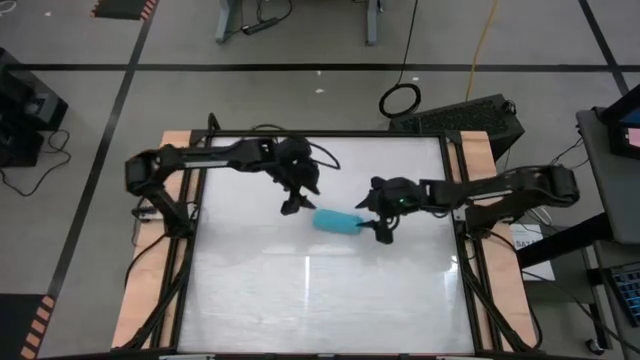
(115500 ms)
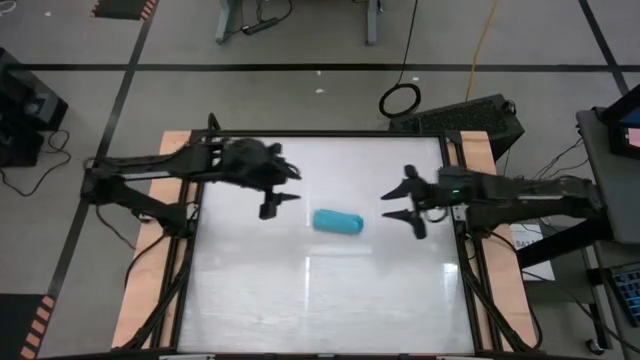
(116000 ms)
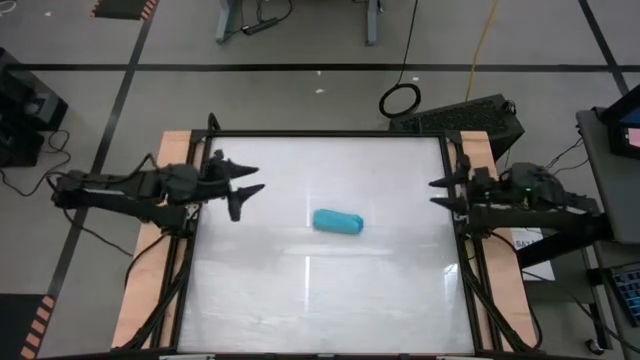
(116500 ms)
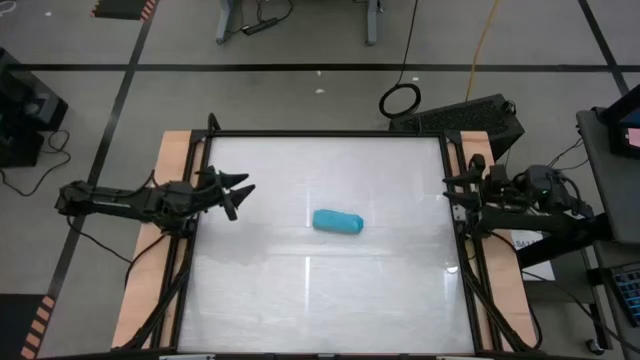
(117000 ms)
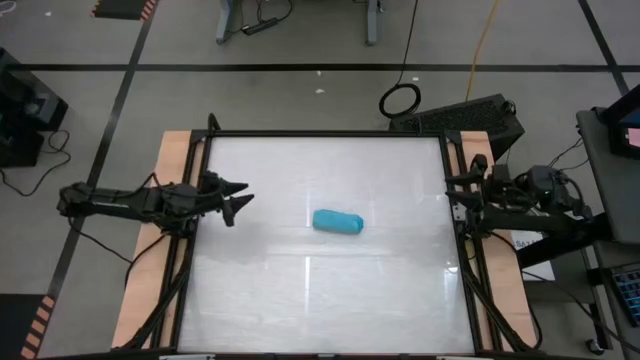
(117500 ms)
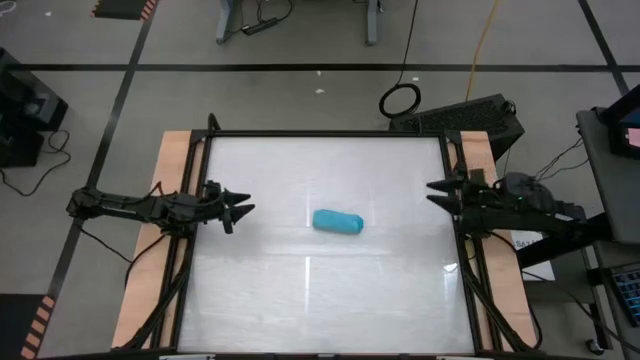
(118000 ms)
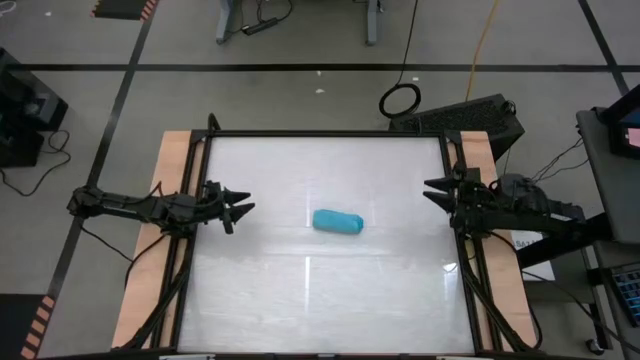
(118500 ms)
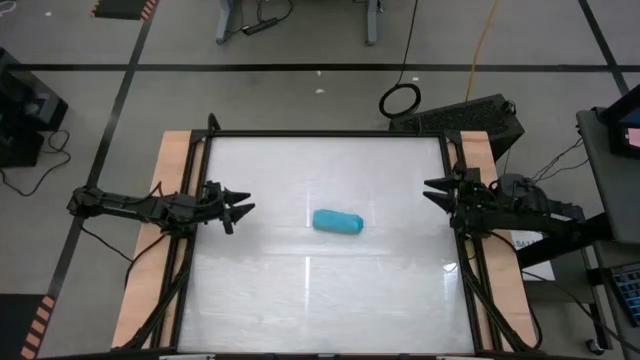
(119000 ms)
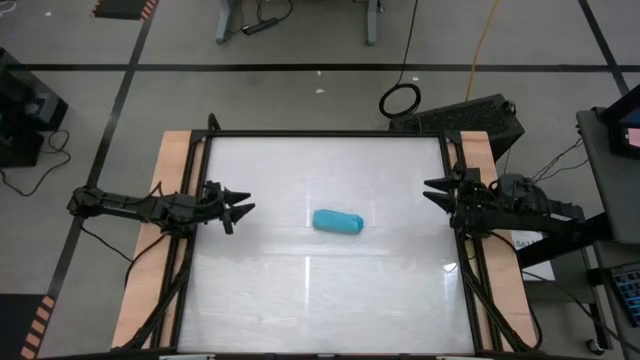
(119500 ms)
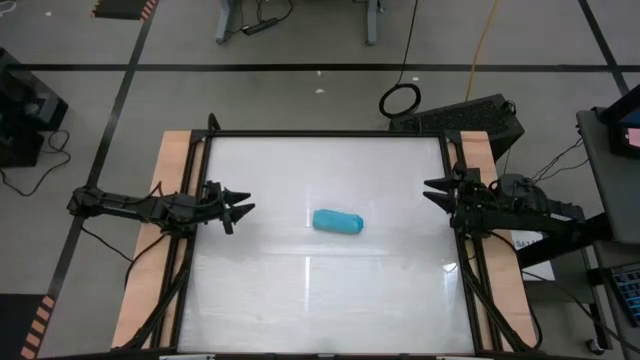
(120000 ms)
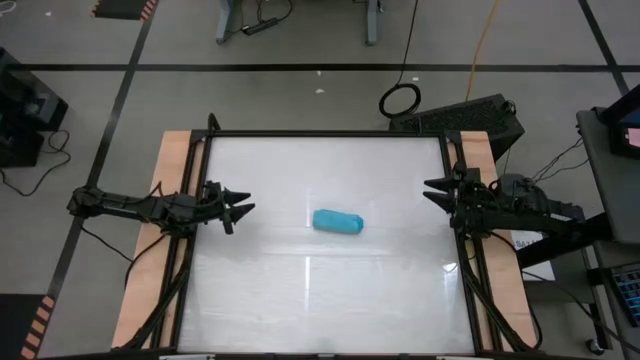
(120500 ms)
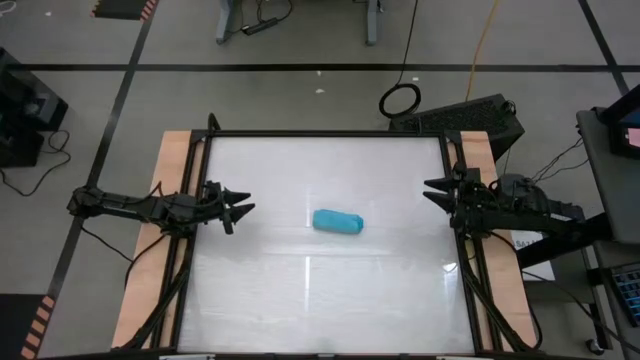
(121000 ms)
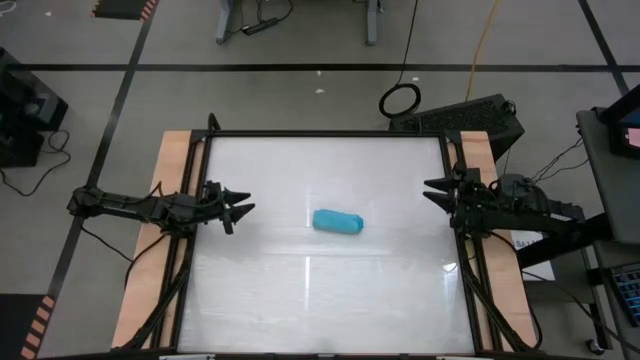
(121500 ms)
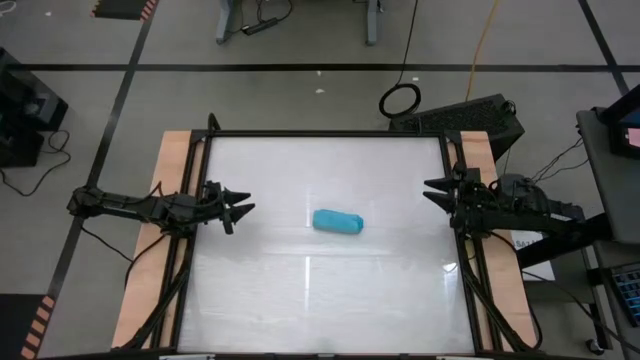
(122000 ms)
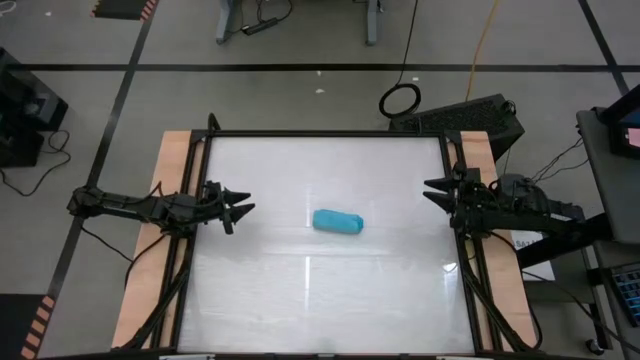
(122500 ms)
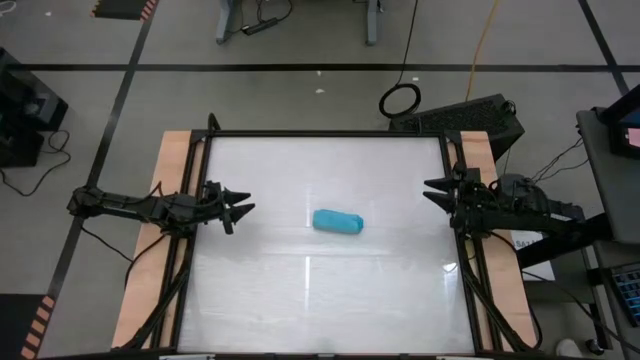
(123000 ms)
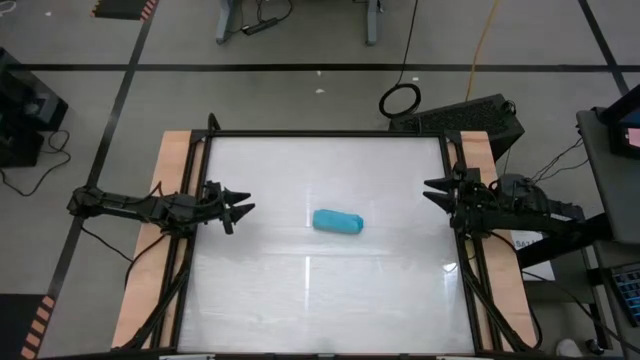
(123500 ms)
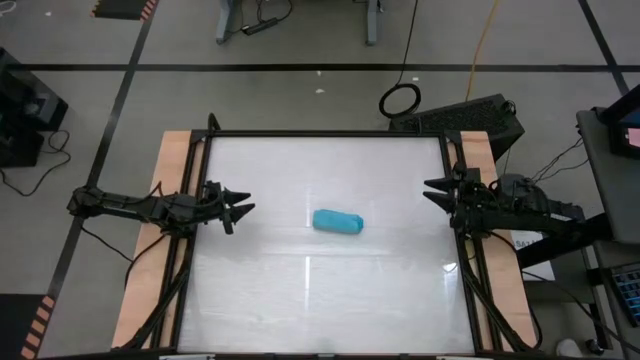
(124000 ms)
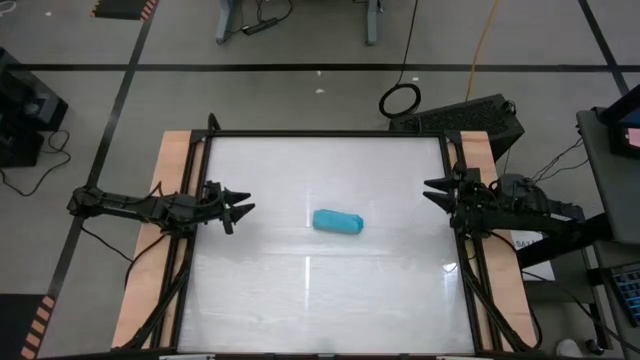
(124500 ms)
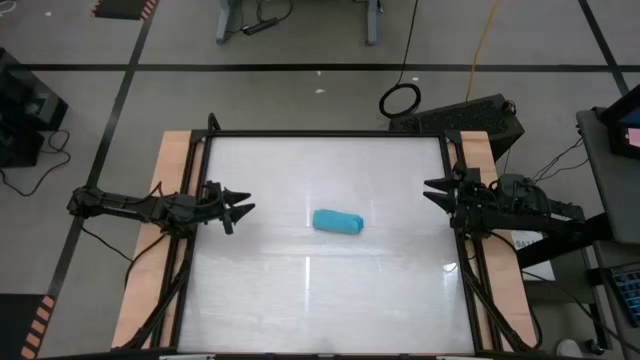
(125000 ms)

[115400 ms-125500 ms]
Task: Roll towel
Return to Home Position

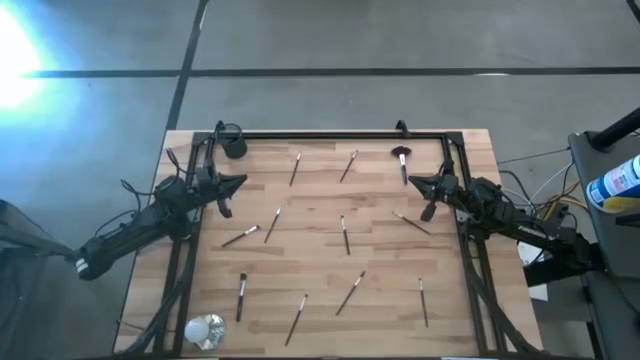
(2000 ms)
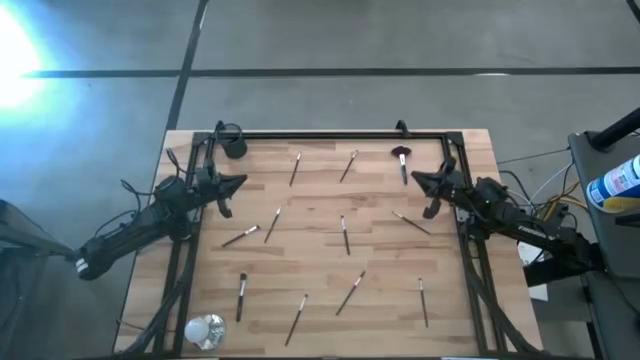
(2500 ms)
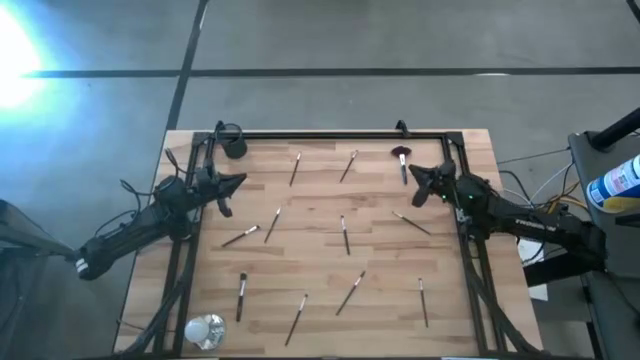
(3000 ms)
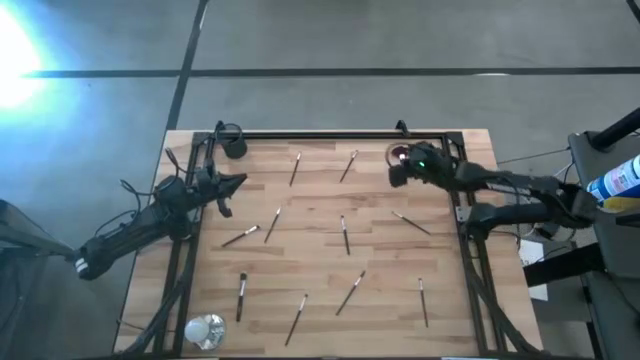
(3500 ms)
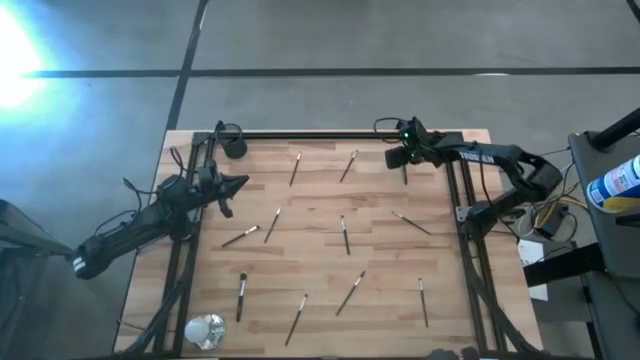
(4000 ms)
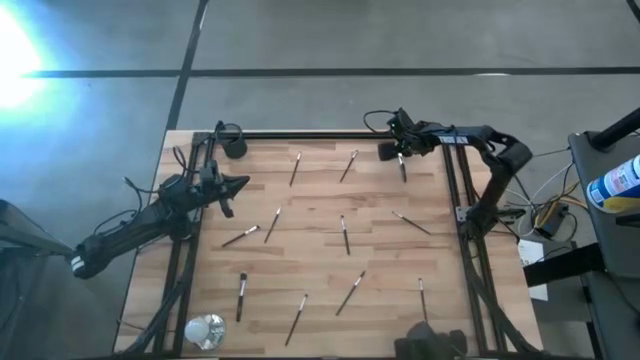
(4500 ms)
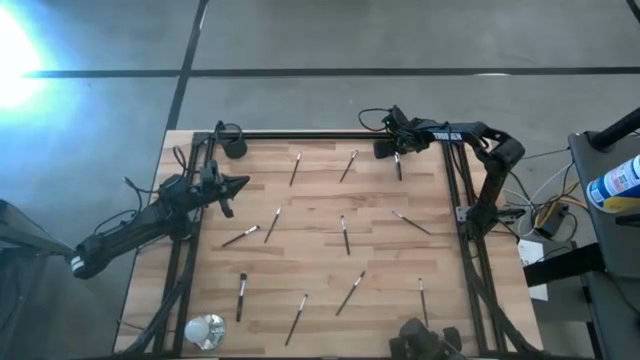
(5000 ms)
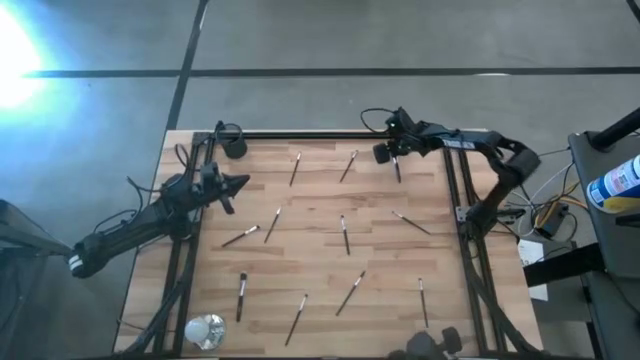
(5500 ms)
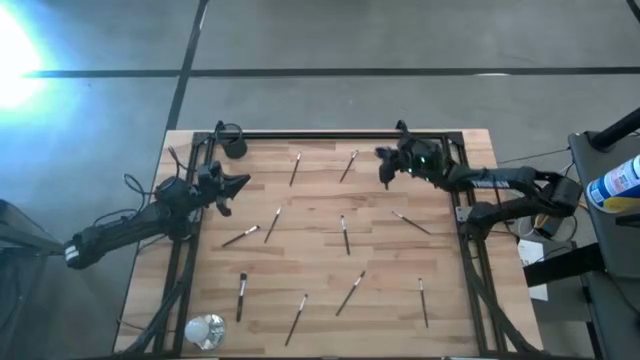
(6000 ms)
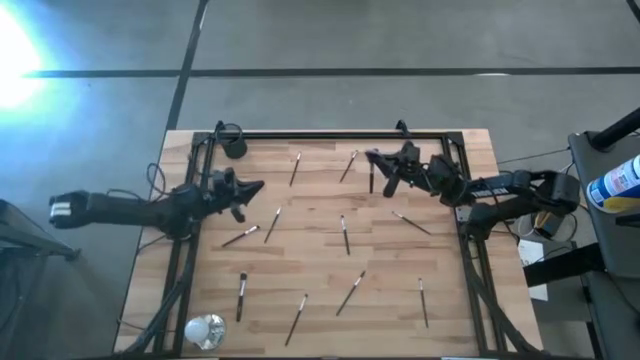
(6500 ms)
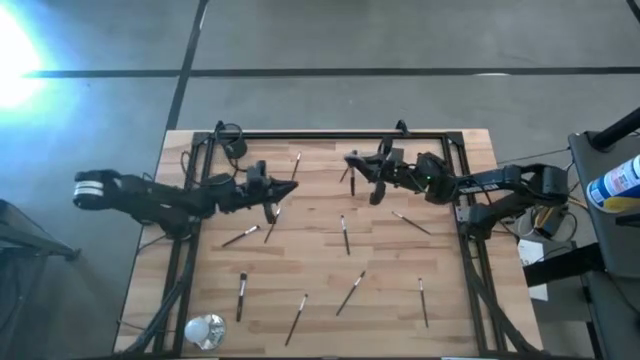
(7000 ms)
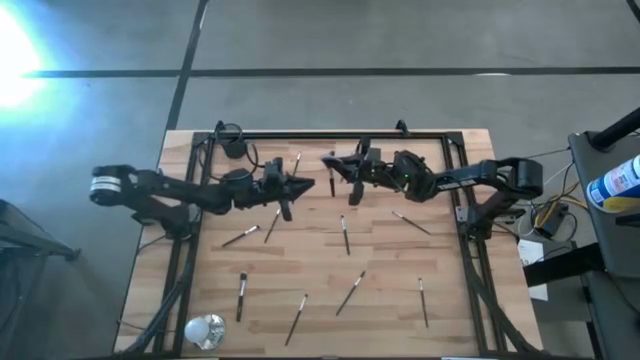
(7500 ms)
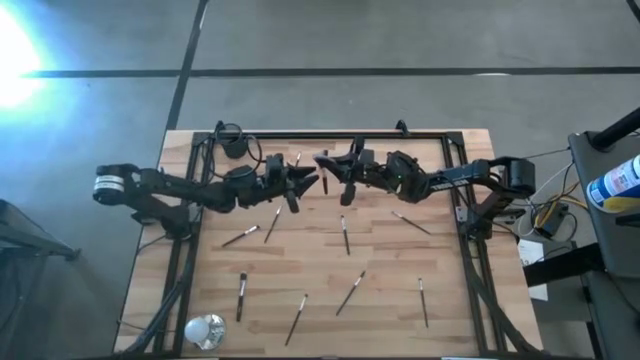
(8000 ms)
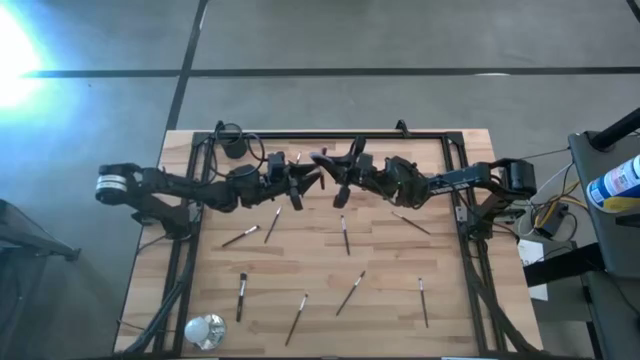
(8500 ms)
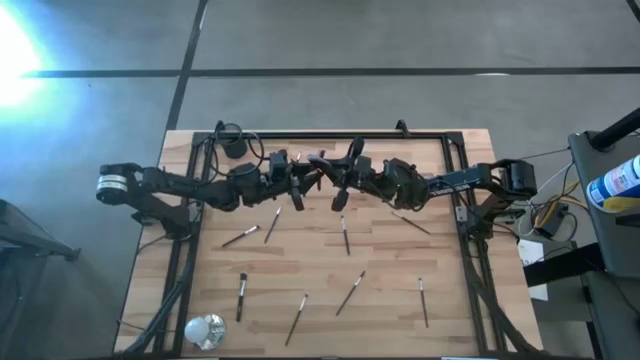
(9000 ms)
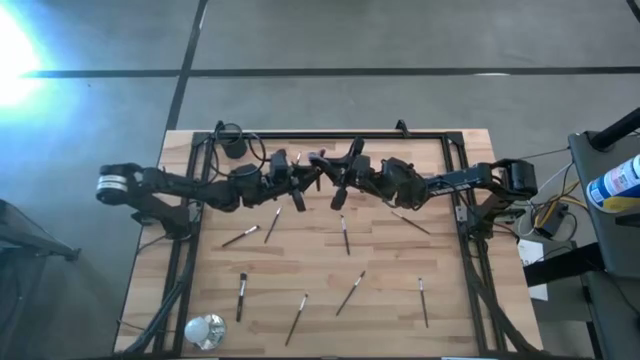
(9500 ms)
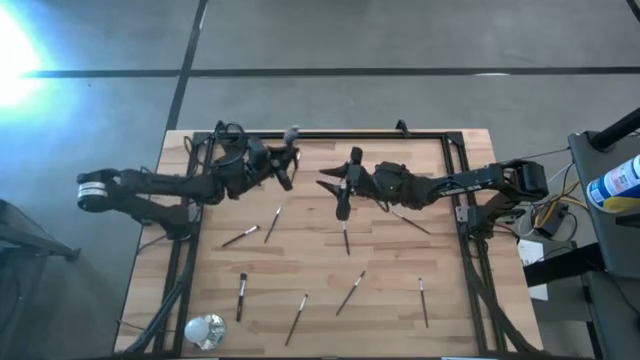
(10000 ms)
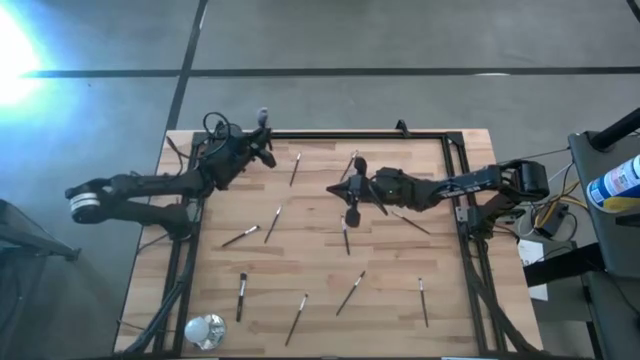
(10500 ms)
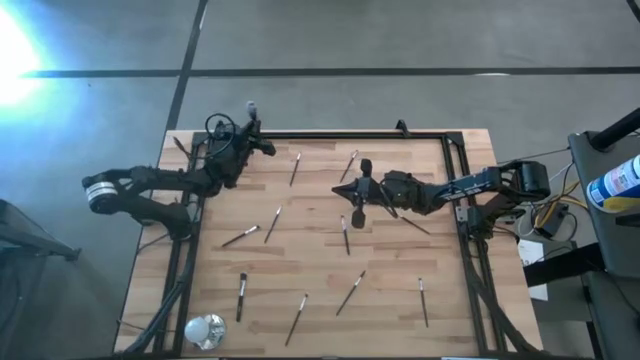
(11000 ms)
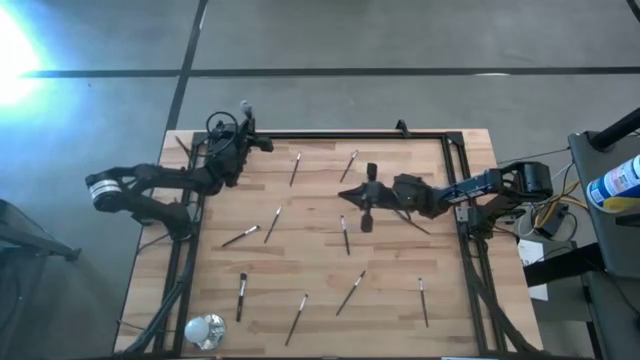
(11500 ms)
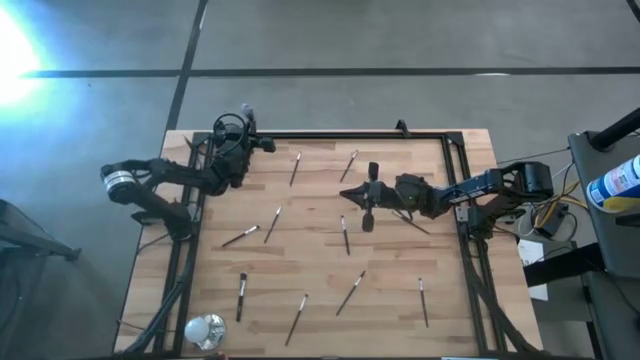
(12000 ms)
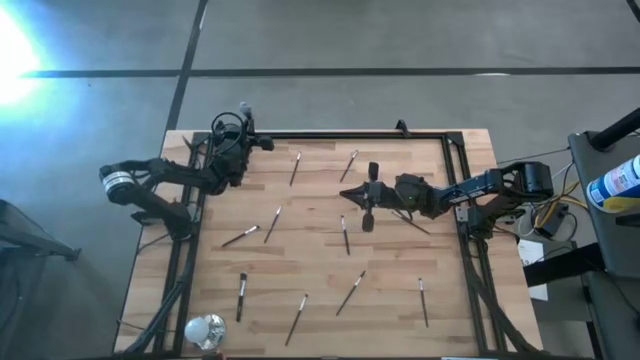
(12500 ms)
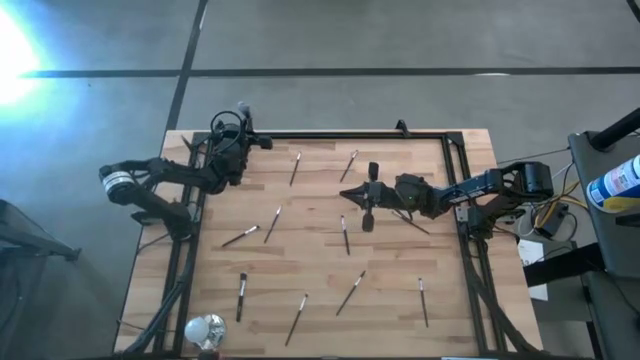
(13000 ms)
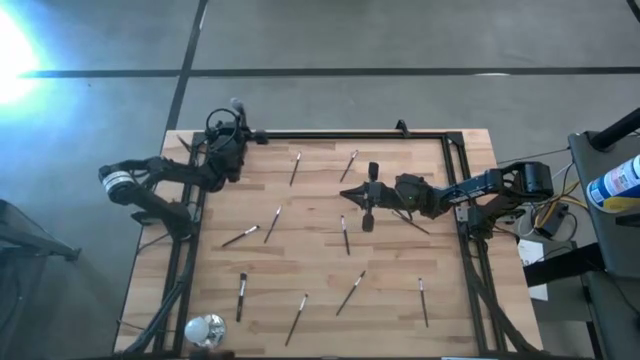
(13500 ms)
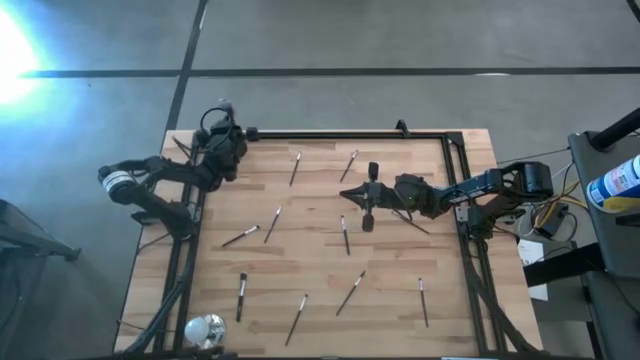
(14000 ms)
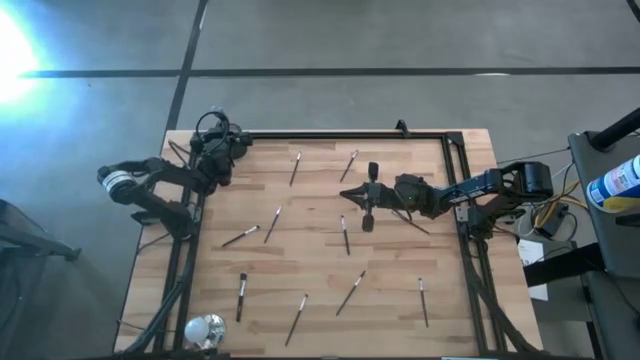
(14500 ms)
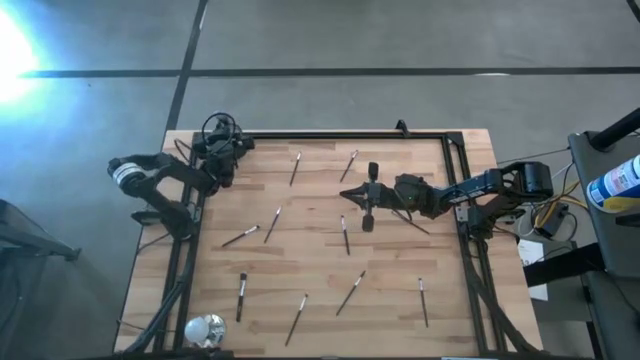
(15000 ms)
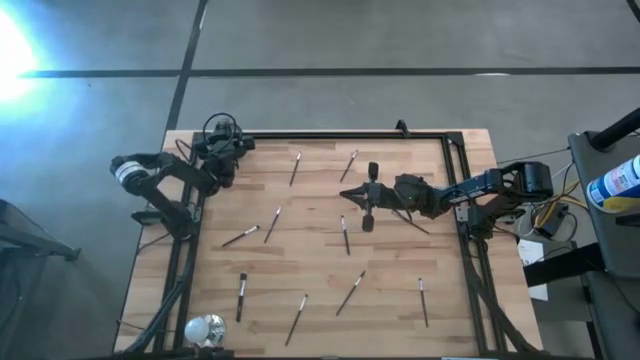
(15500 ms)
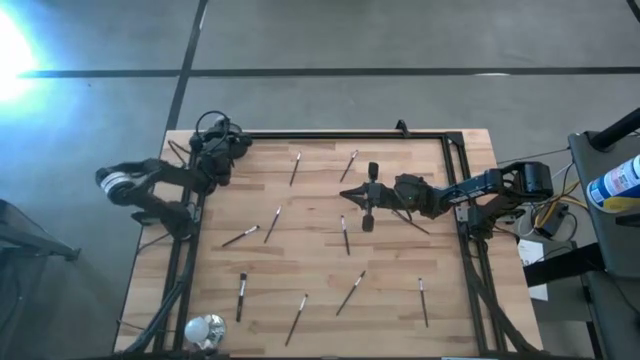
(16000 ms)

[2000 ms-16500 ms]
Task: Put items in baskets/containers
Put the black highlighter brush into the black pen holder
